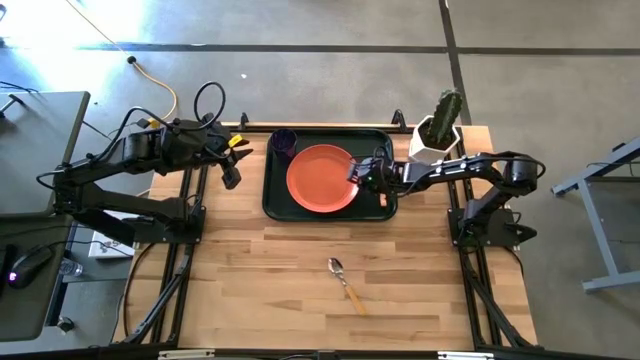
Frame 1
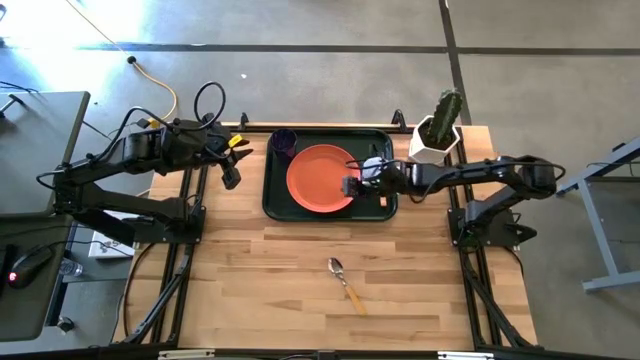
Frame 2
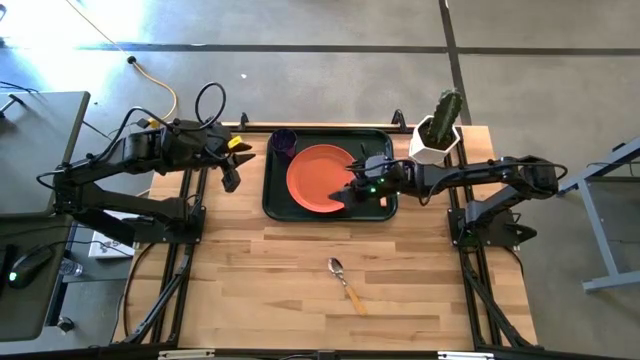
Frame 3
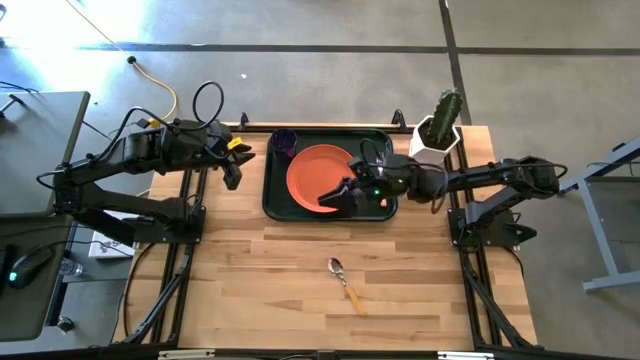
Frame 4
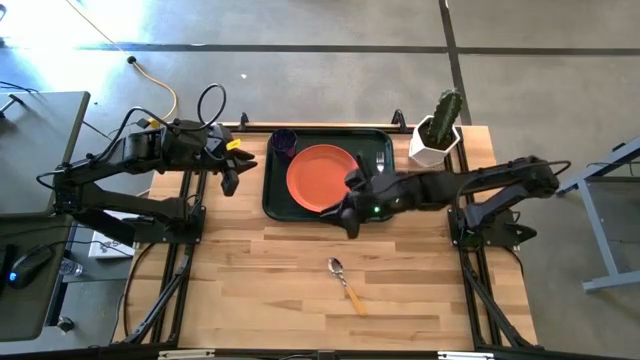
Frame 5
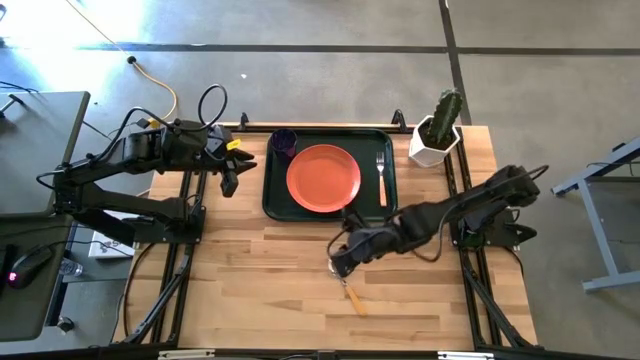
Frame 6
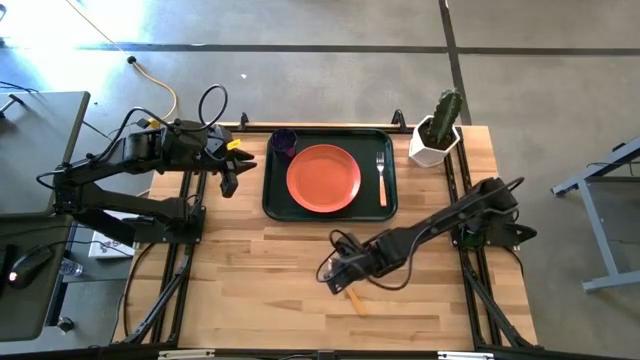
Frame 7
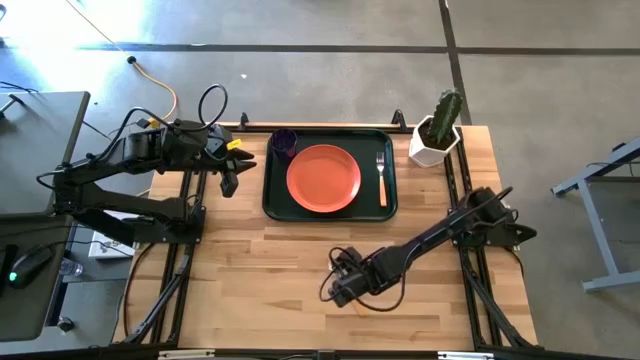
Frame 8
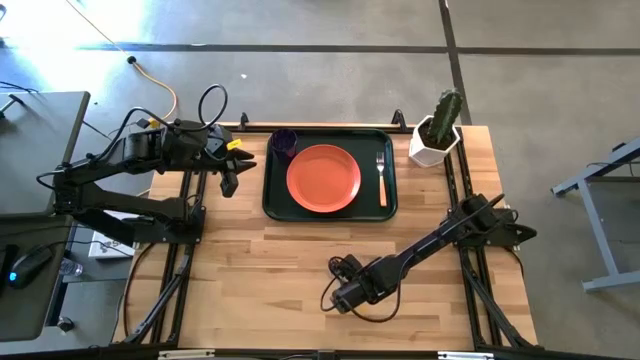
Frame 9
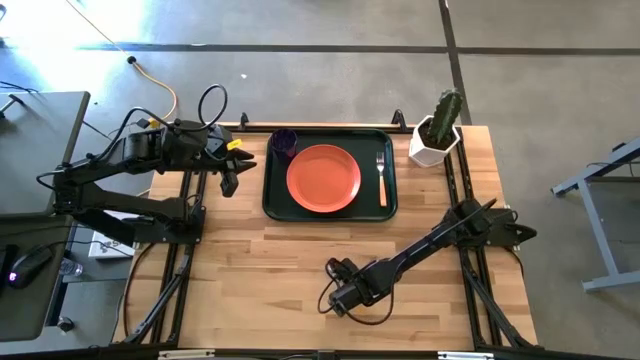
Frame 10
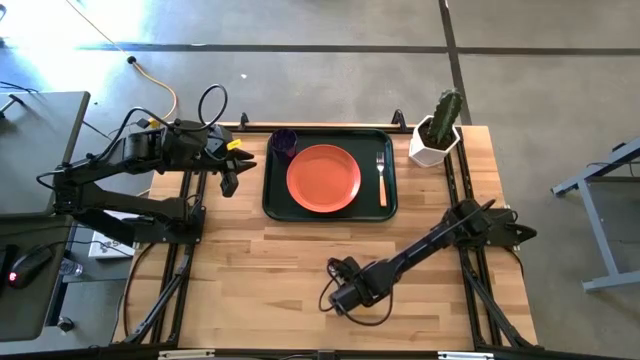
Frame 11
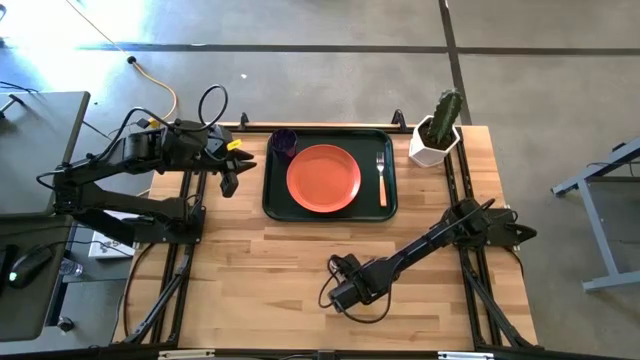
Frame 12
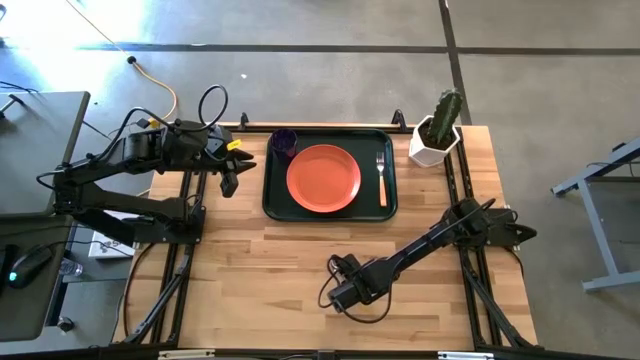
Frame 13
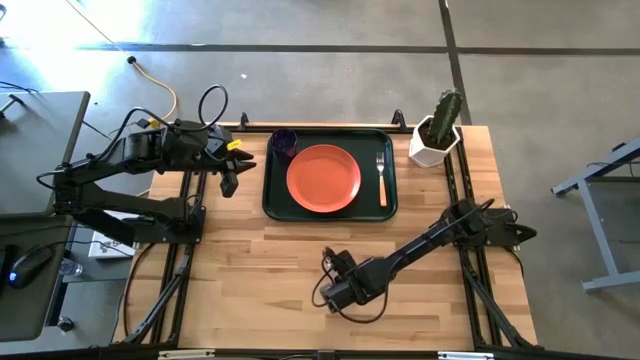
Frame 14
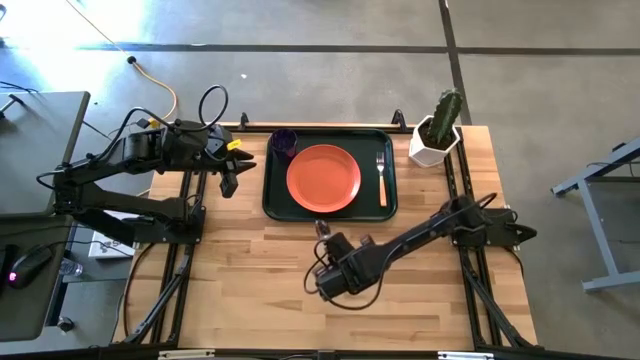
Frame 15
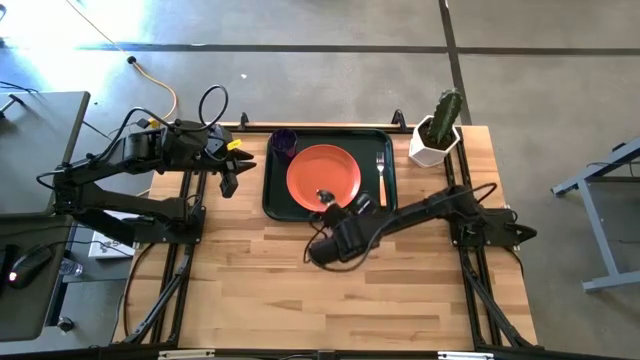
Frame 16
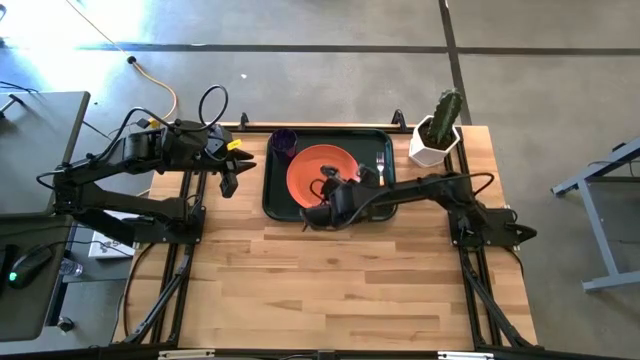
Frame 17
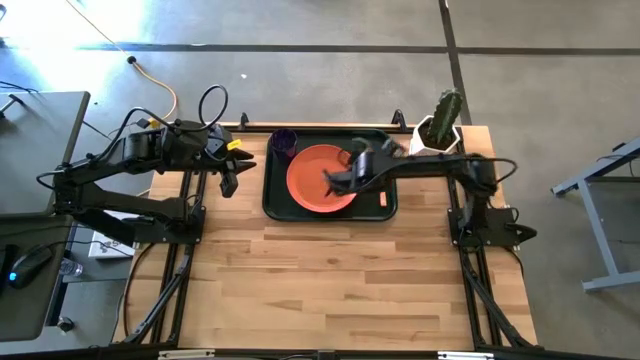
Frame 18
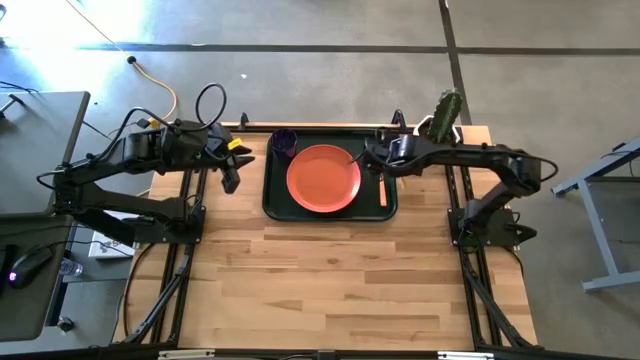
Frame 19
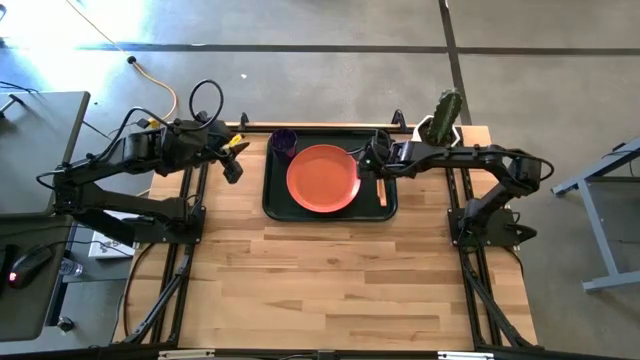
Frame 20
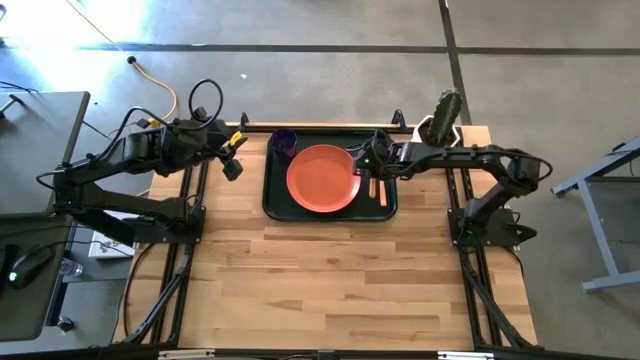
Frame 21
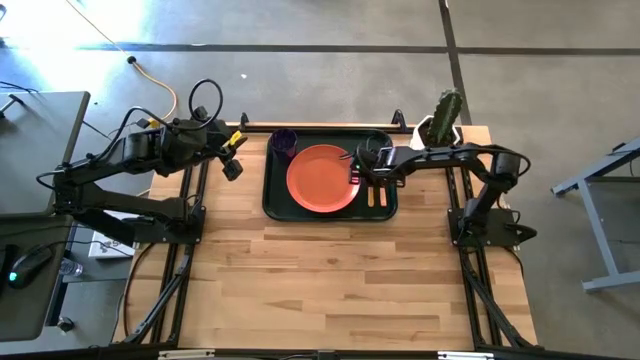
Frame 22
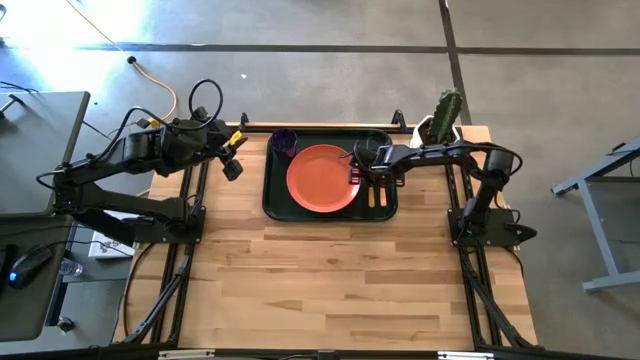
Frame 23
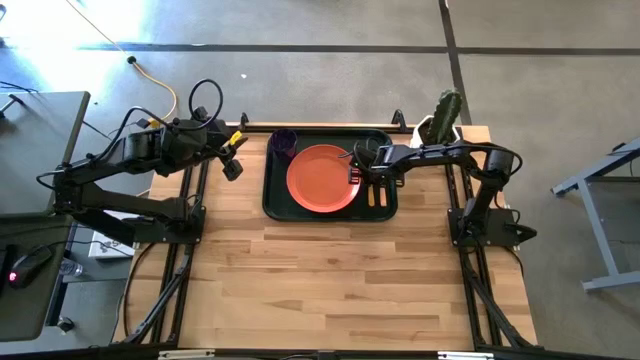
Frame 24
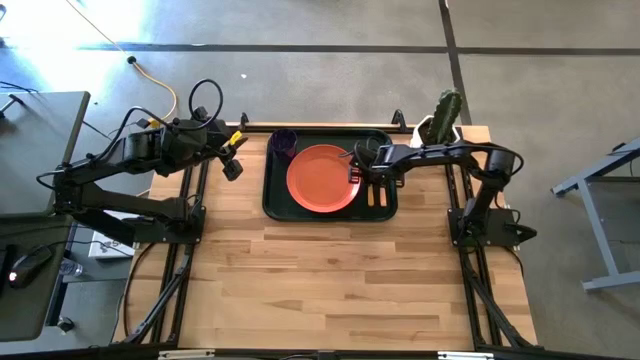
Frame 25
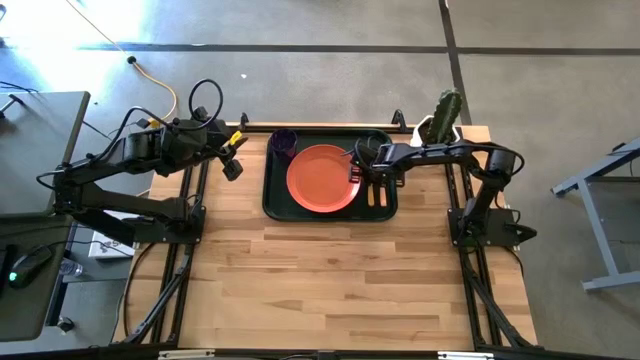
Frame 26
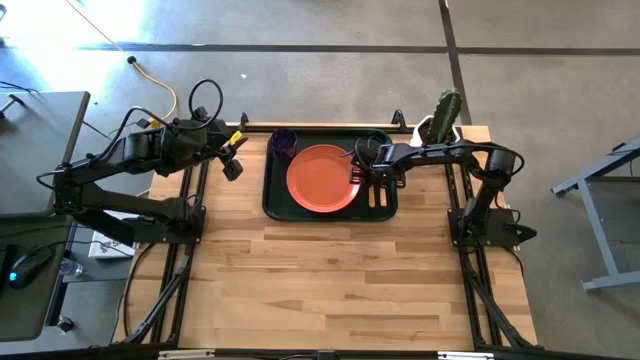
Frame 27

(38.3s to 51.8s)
Task: Pick and place plate/cup/fork/spoon on tray
Put the orange spoon on the serving tray

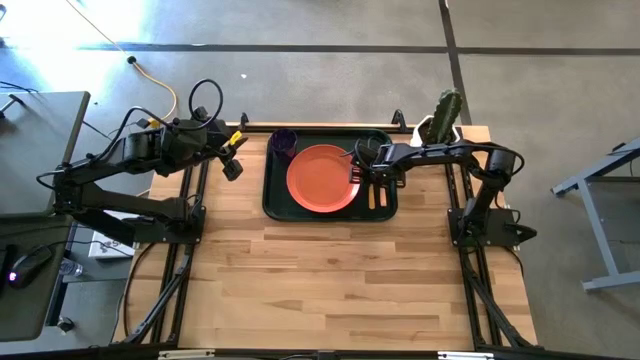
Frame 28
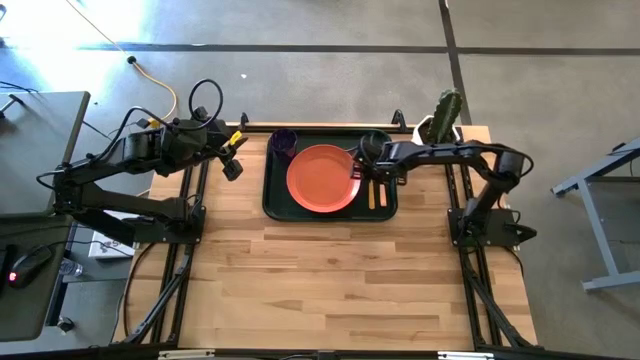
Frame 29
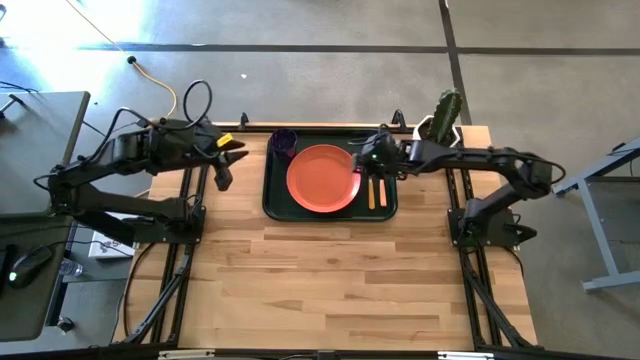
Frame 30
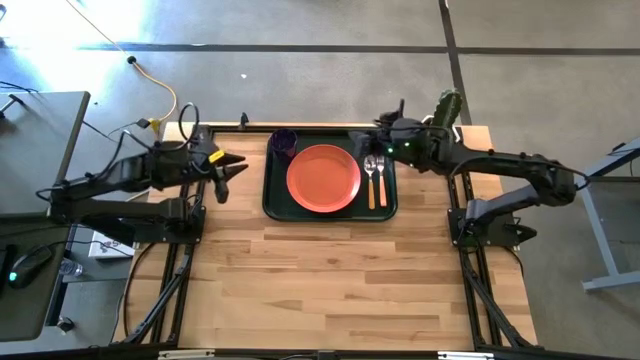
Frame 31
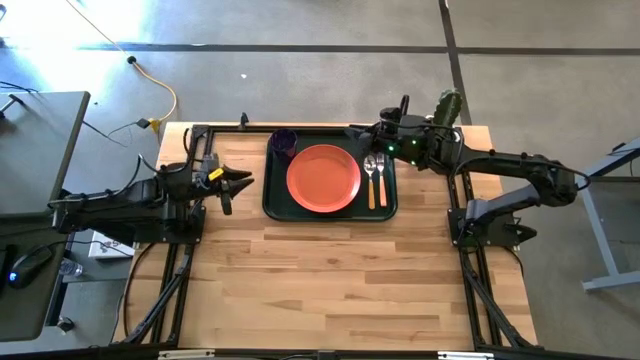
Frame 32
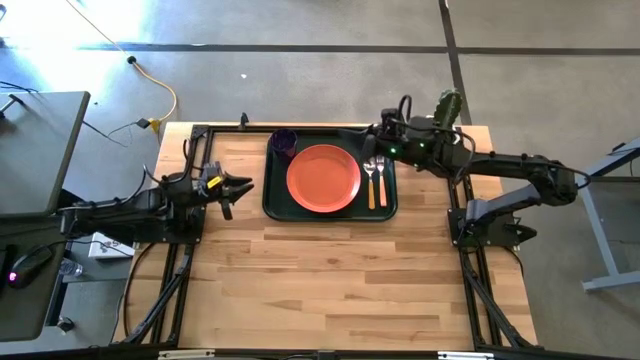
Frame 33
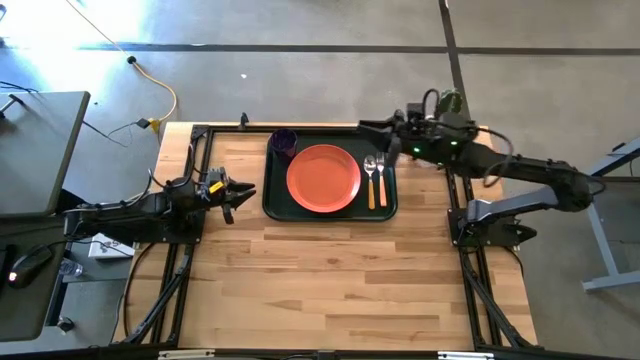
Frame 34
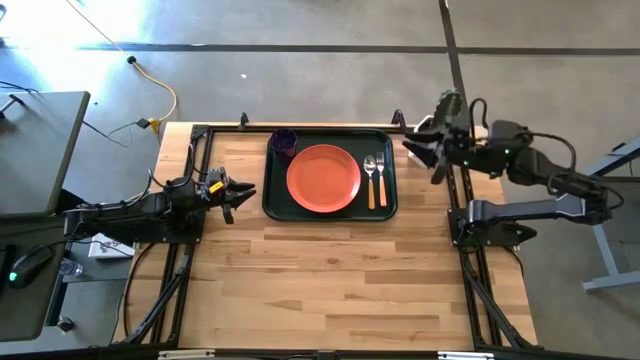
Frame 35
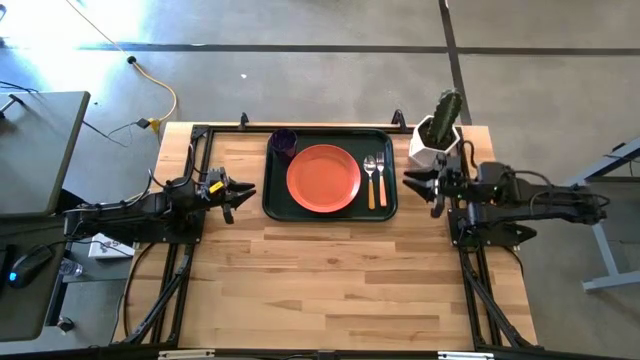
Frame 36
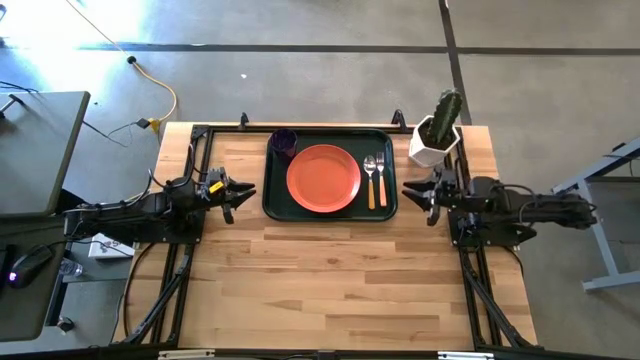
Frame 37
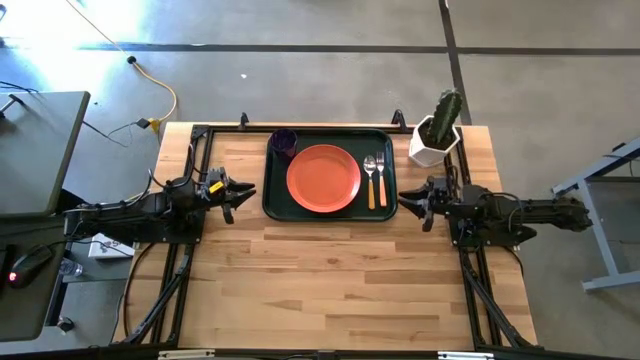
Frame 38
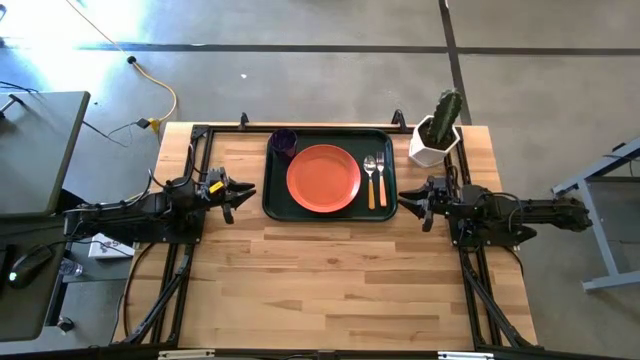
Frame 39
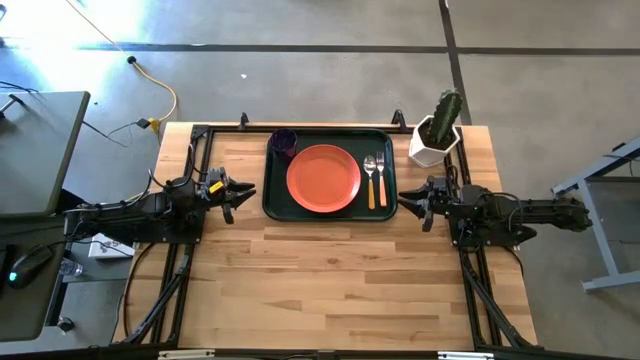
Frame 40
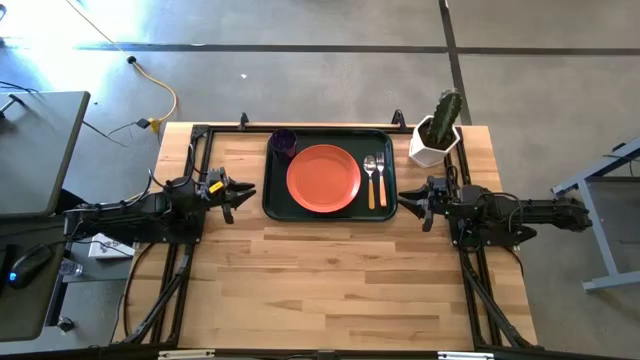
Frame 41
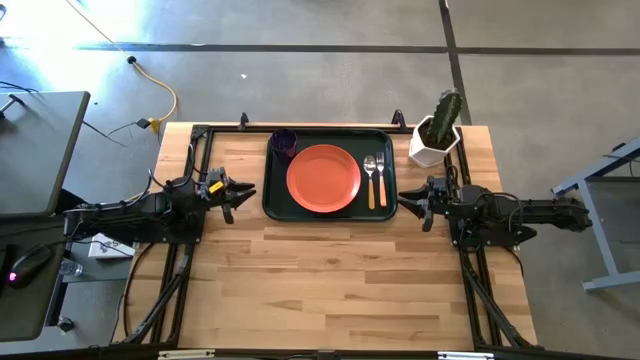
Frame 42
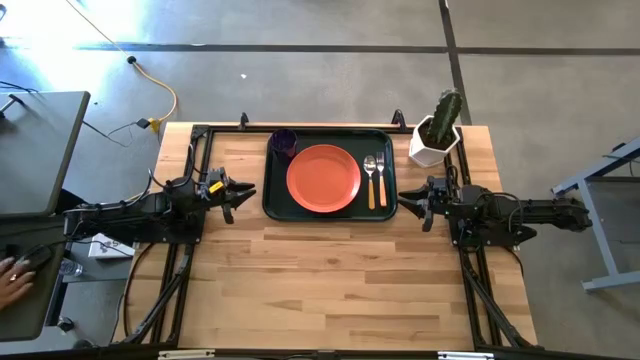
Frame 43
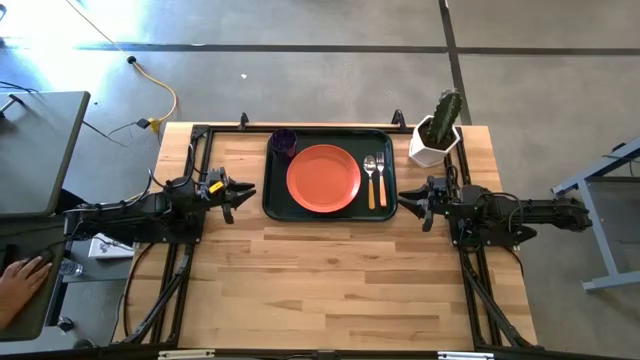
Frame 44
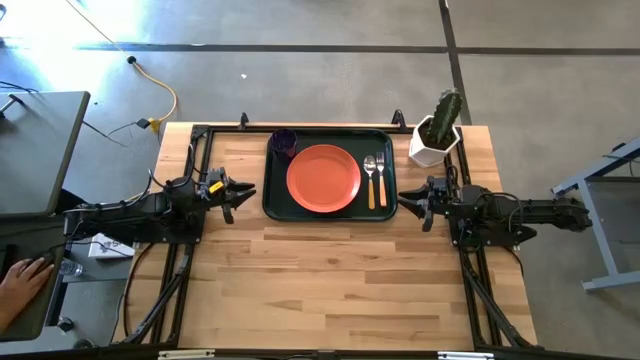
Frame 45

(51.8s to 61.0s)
Return to Home Position
